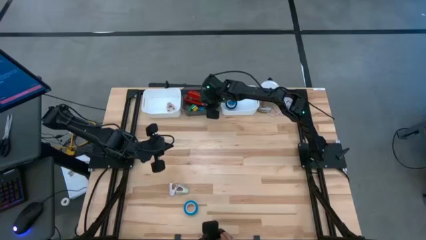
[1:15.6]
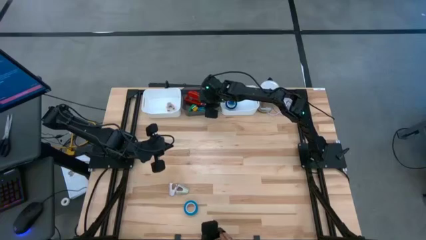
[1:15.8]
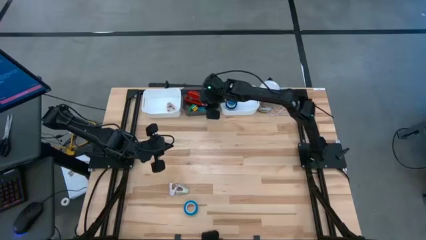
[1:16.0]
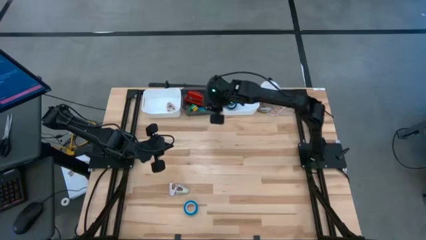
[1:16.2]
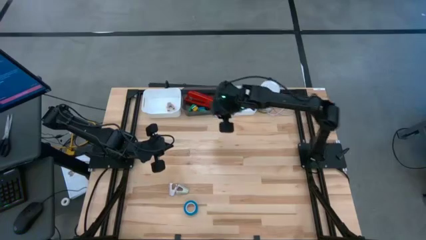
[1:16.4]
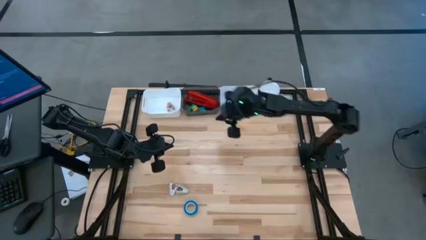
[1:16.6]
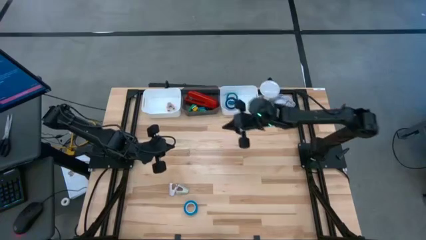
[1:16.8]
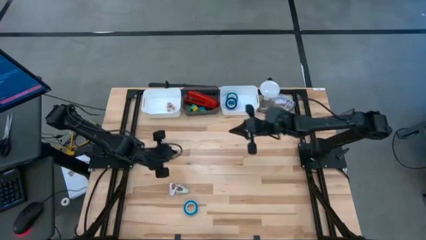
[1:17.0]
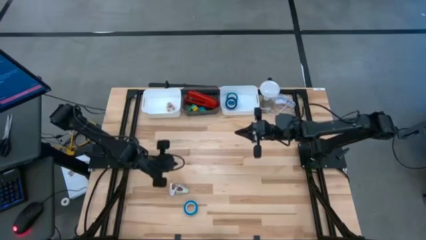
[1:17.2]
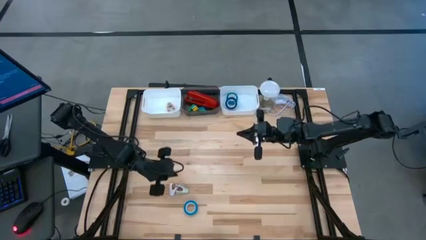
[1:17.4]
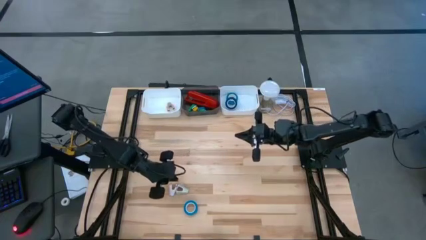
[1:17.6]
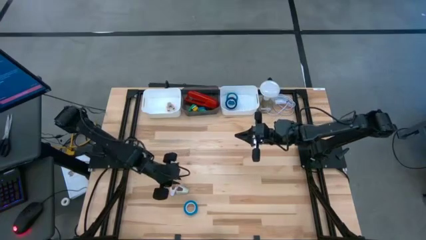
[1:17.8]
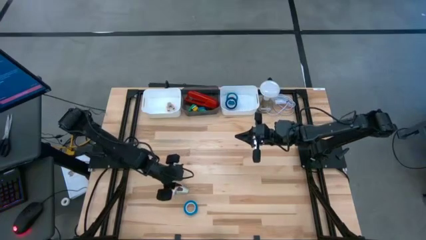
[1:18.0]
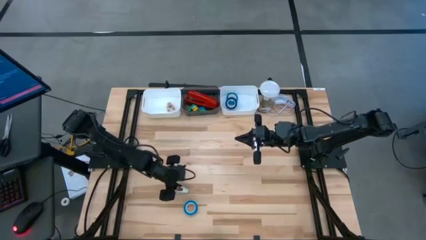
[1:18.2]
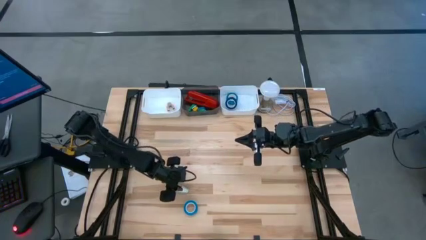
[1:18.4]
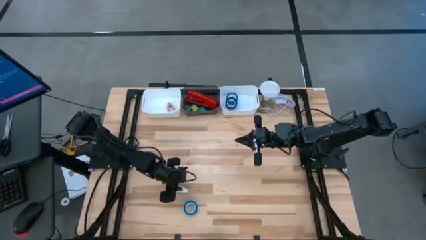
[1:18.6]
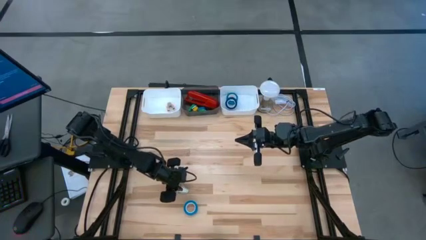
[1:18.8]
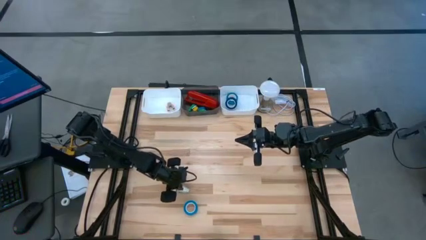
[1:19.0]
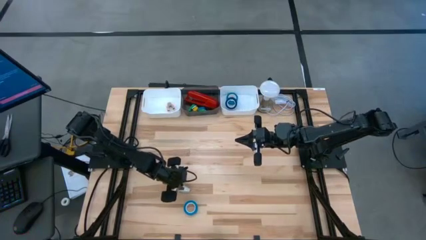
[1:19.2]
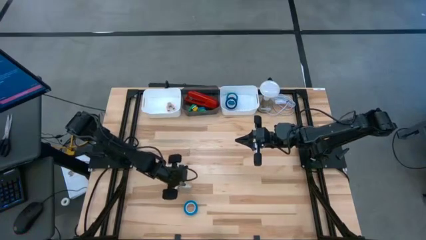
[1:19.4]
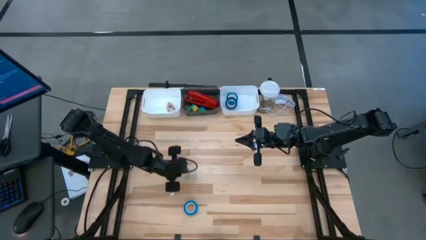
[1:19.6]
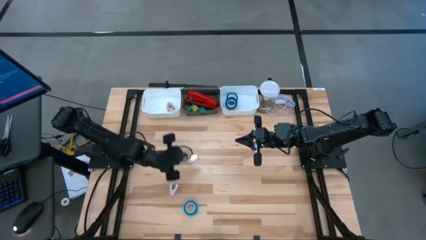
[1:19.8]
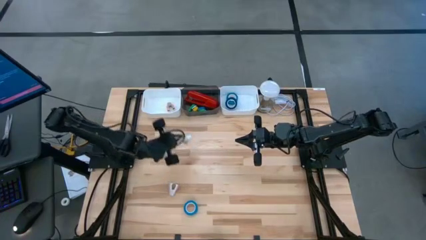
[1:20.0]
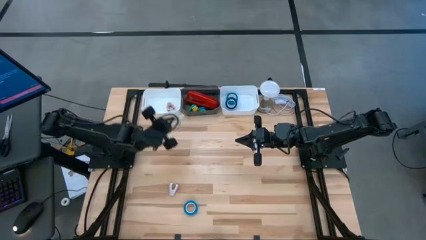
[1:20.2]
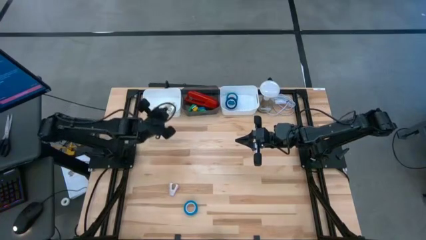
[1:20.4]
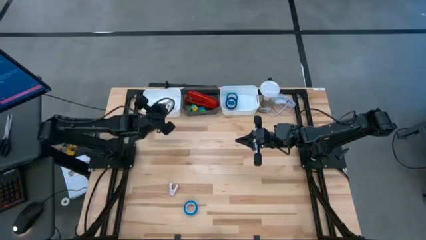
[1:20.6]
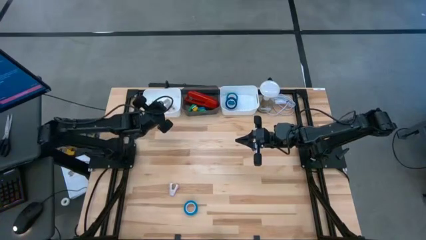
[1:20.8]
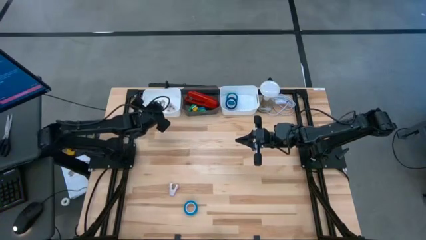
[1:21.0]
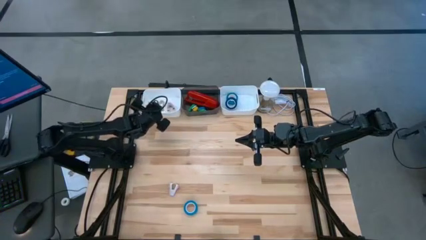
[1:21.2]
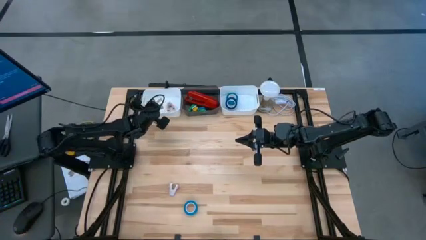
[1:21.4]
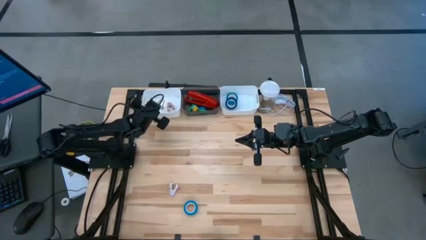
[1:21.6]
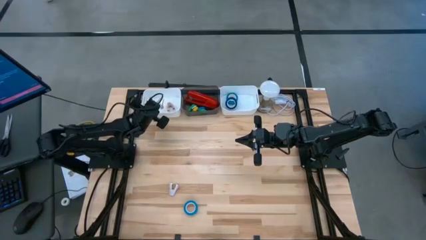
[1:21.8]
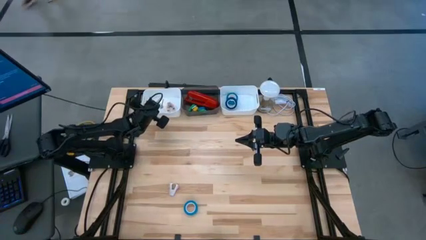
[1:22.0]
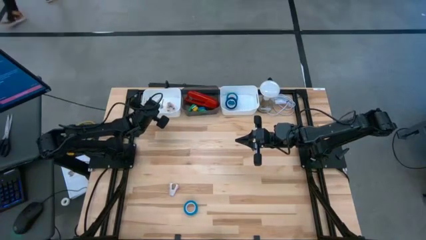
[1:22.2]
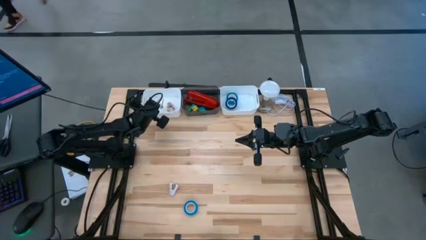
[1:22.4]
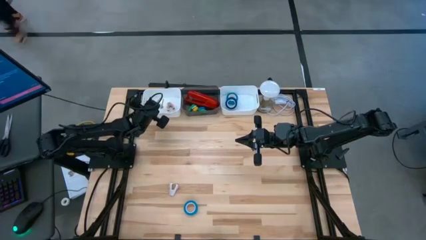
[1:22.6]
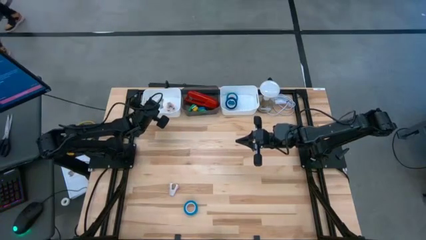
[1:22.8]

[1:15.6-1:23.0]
Task: Pick and place Stapler, Stapler remover, tape
Put the gray staple remover into the left white bin

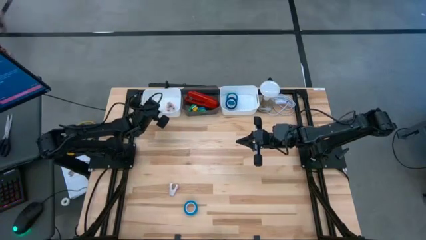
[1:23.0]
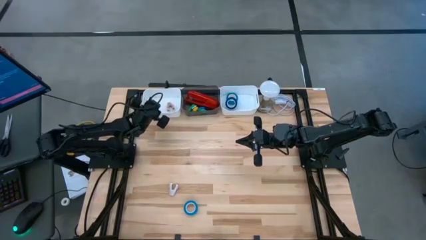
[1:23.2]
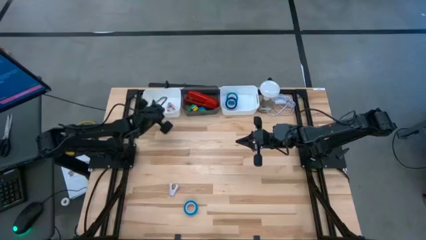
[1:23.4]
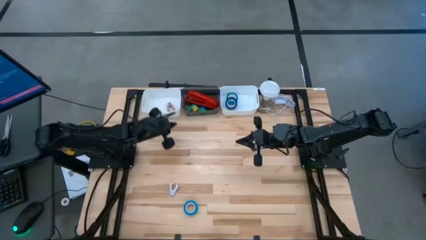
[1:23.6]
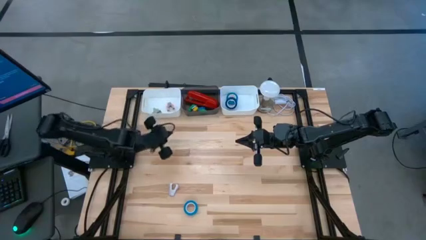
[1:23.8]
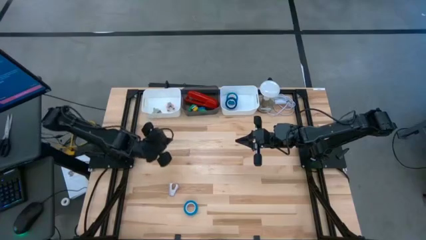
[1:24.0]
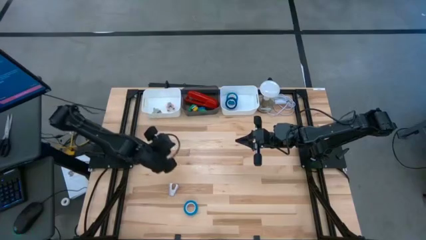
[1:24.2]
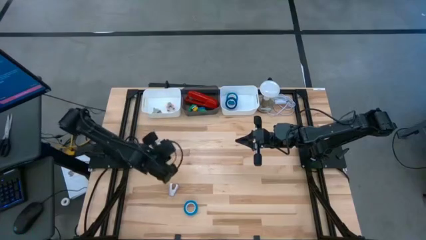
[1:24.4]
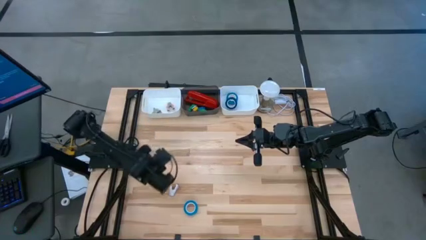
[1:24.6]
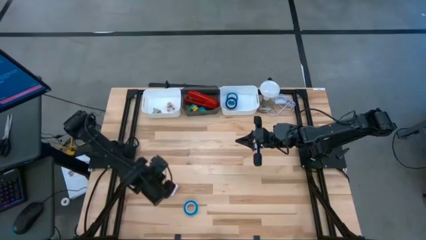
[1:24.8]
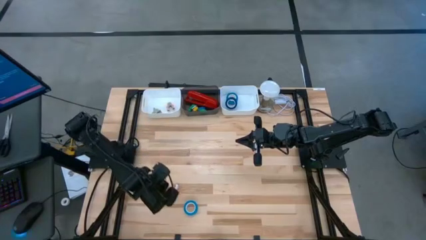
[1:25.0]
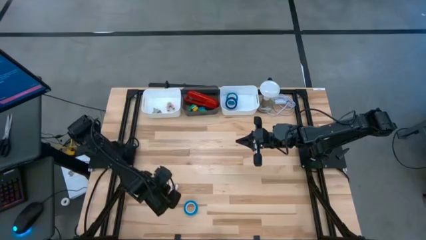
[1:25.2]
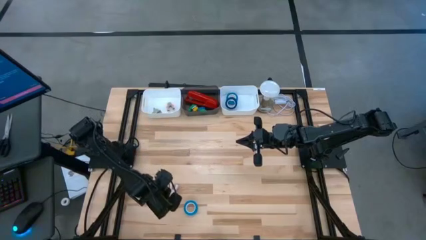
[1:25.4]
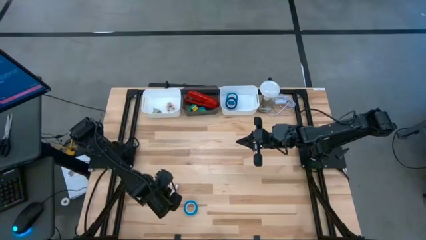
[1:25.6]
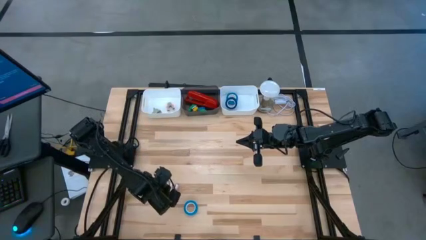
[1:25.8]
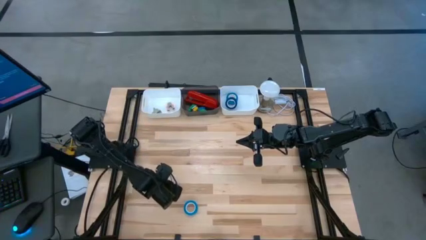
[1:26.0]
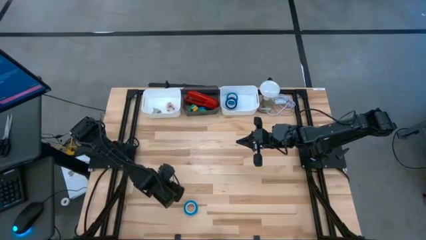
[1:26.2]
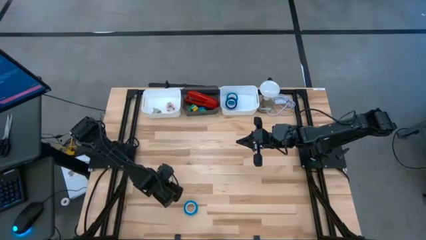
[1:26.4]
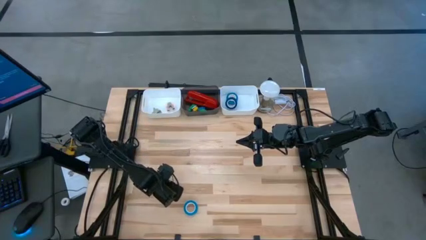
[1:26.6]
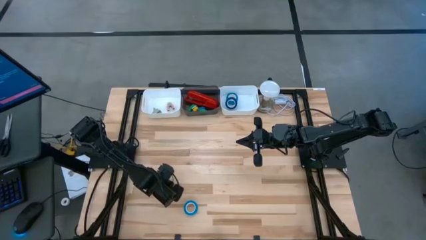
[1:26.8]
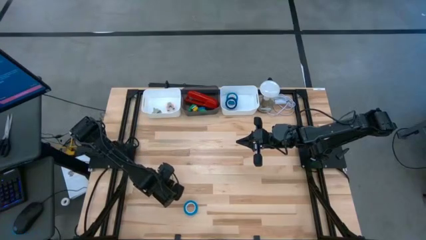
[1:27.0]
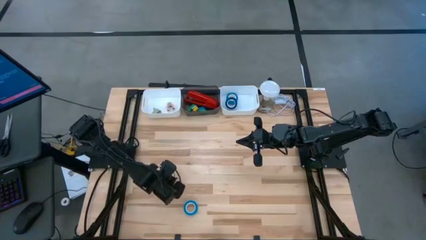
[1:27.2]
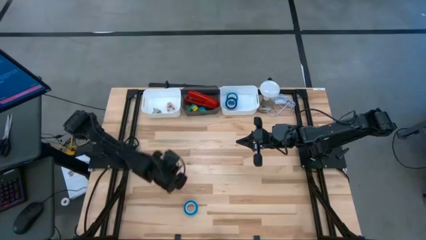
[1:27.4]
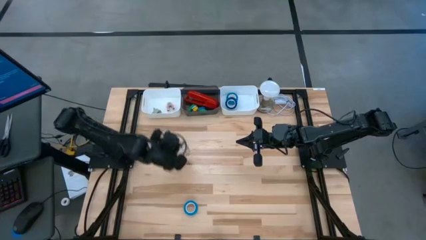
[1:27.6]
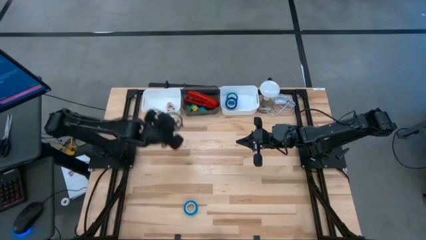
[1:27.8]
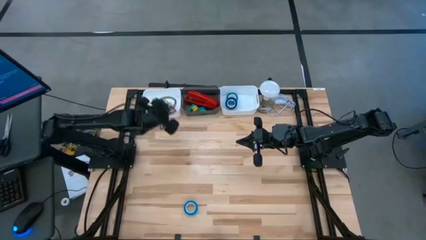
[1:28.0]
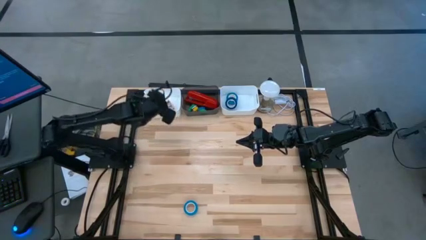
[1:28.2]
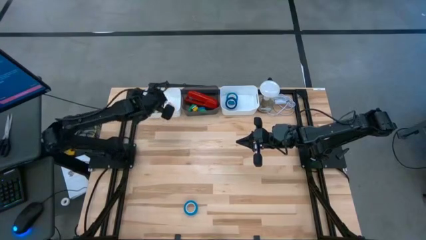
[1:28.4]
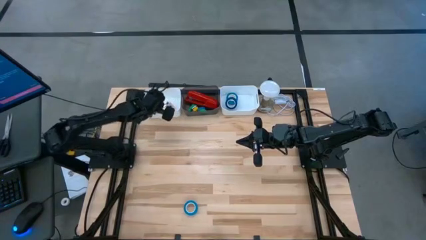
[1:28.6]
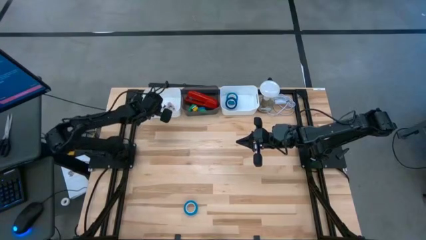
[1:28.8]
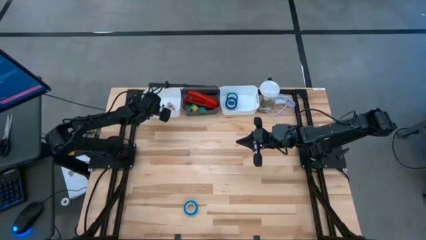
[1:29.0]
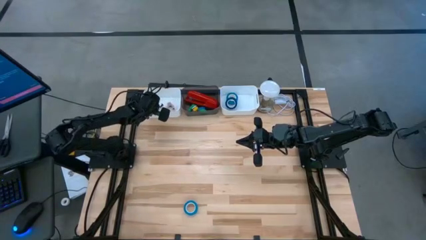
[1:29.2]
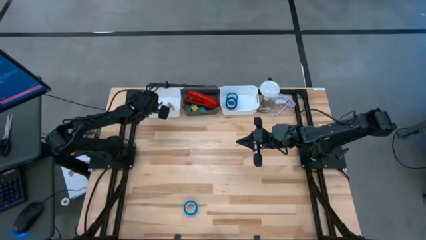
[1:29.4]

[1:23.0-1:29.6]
Put the purple staple remover into the left white bin
